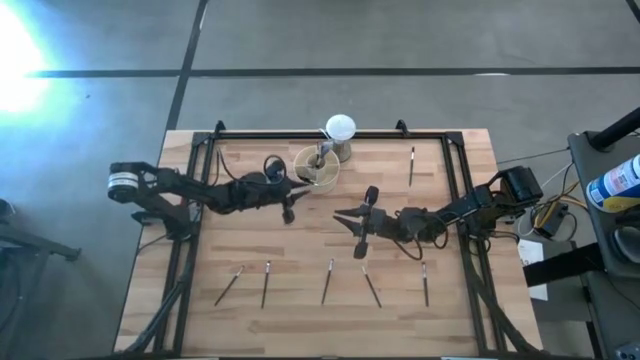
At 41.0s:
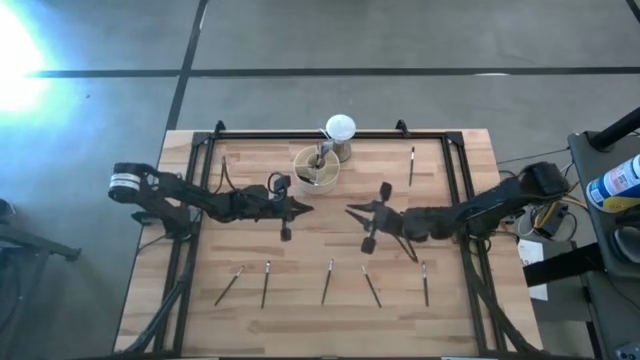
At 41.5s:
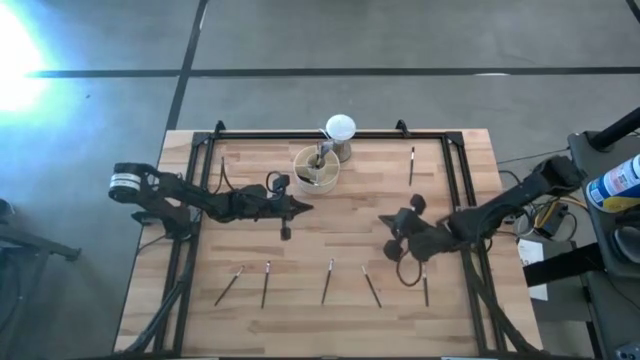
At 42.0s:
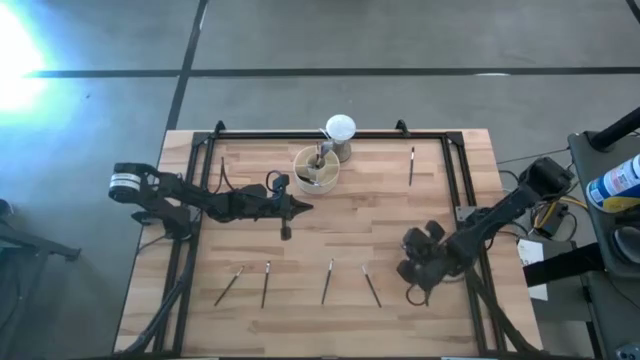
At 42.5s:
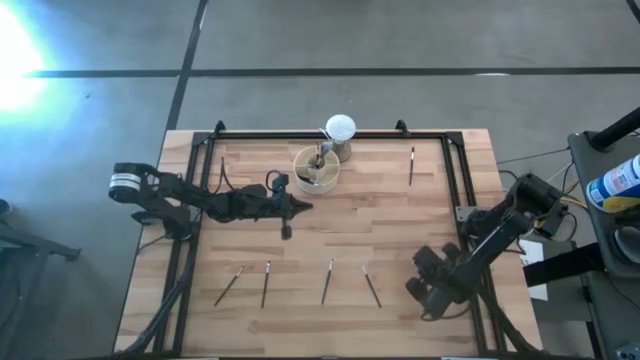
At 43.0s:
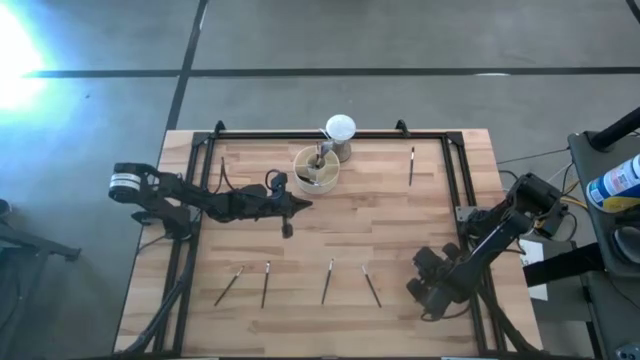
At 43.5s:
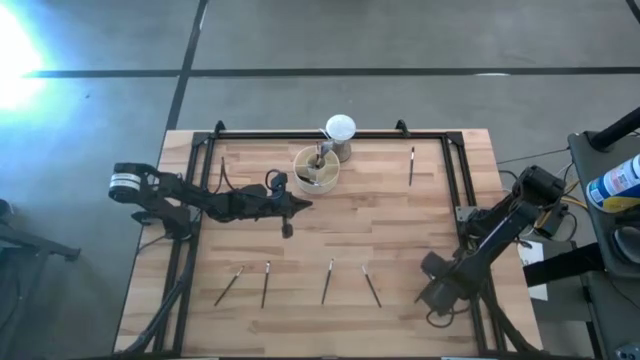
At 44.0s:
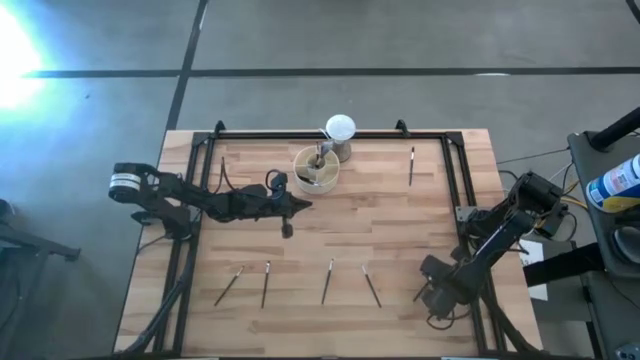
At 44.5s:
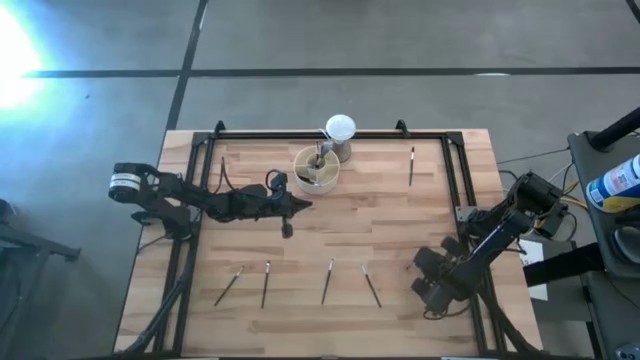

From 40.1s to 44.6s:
Task: Put items in baskets/containers
Put the black blush brush into the white organizer

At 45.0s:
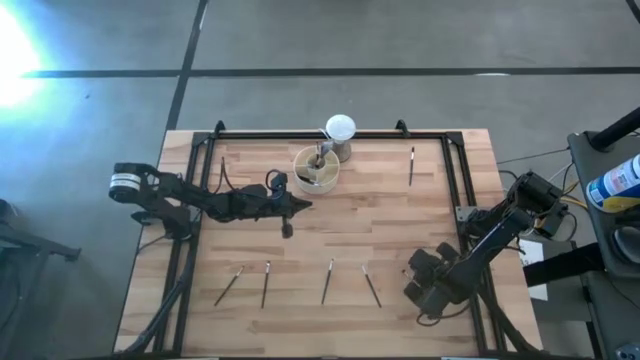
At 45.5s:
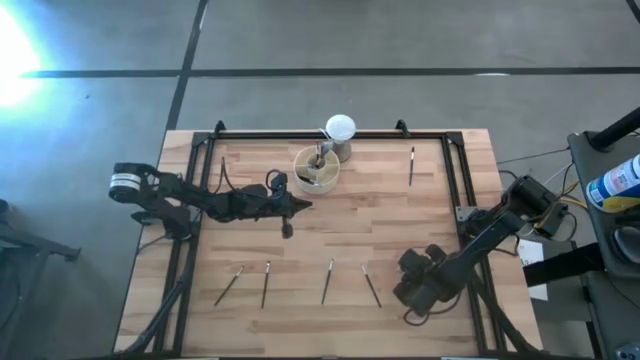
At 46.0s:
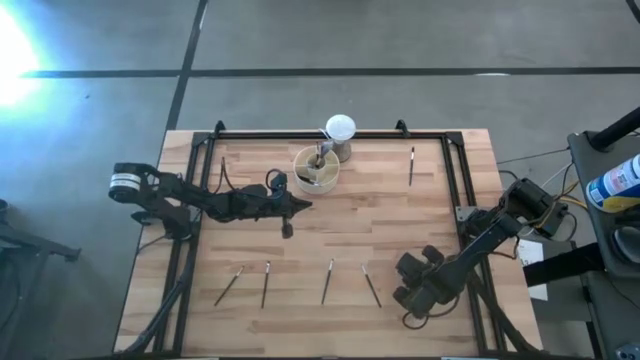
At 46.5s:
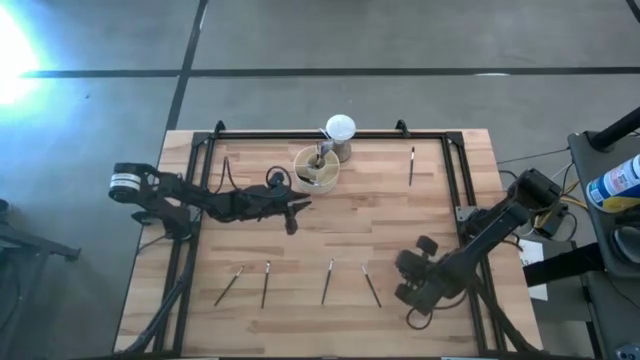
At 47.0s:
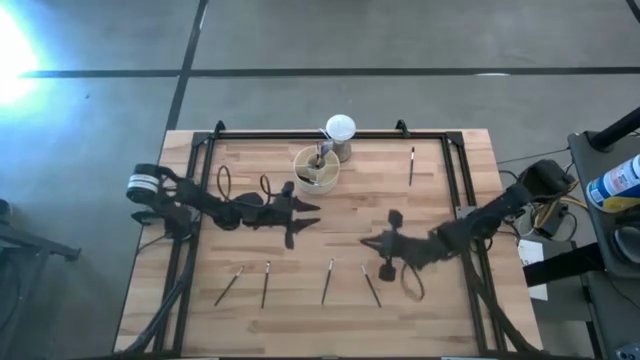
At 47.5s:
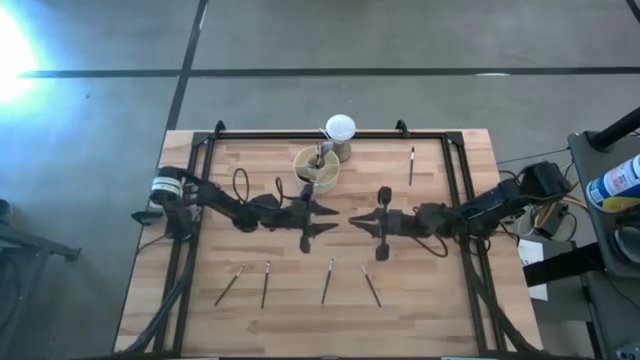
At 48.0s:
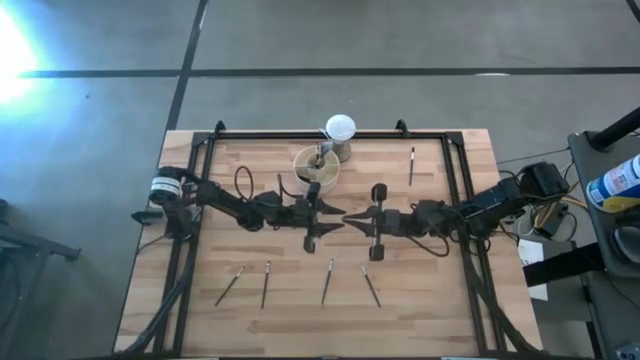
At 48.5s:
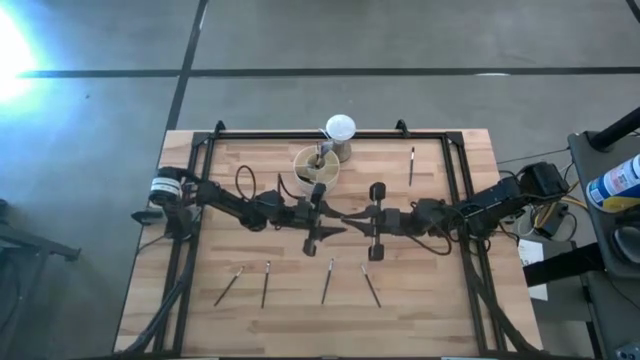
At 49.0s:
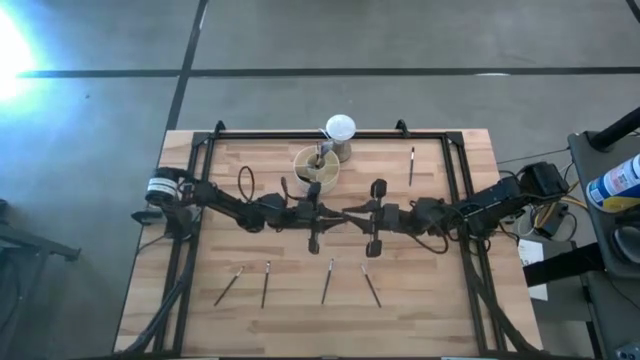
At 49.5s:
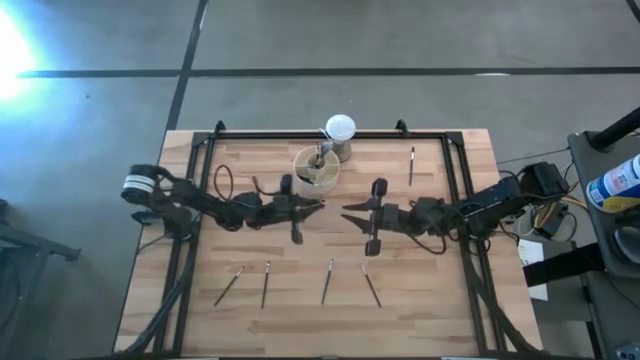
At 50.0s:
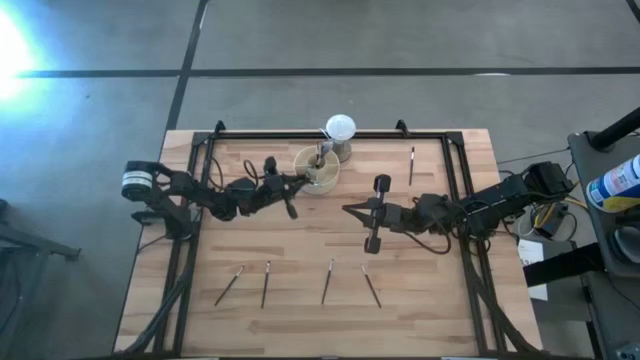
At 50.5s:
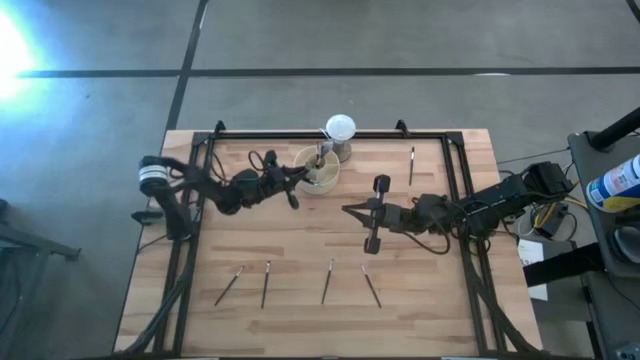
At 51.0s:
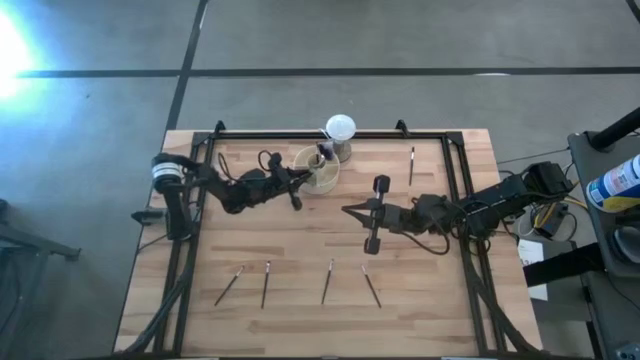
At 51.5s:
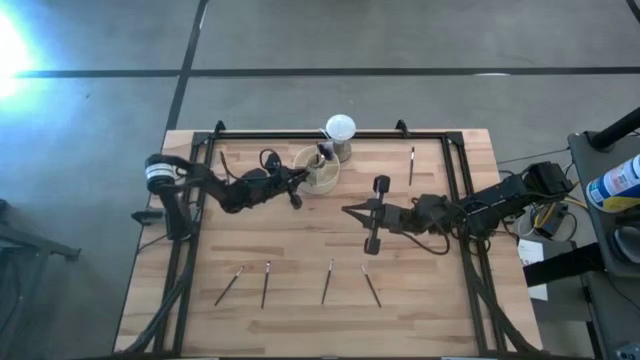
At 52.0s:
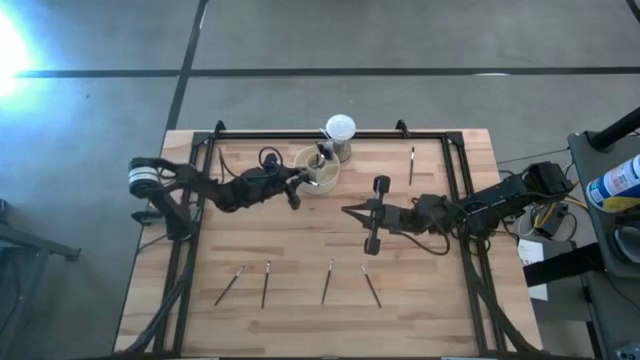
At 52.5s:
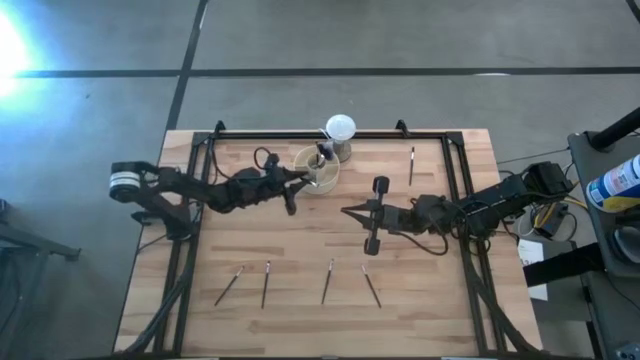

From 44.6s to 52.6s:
Put the black blush brush into the white organizer

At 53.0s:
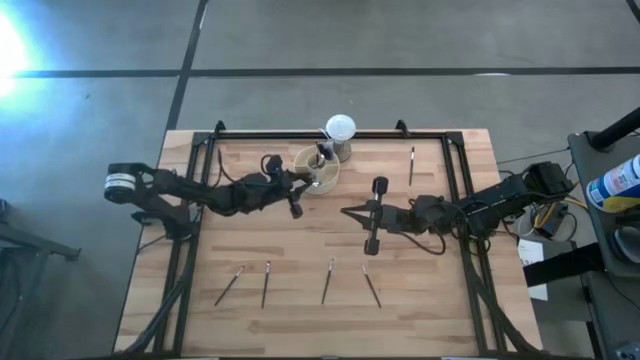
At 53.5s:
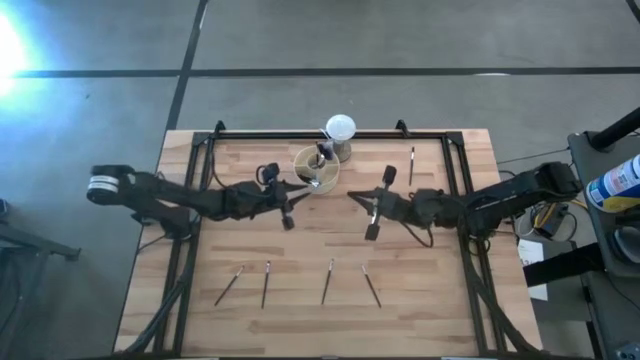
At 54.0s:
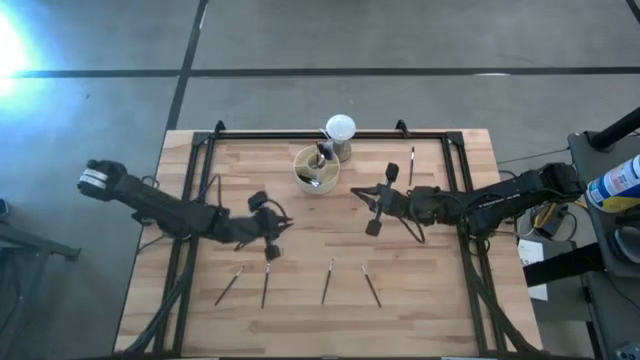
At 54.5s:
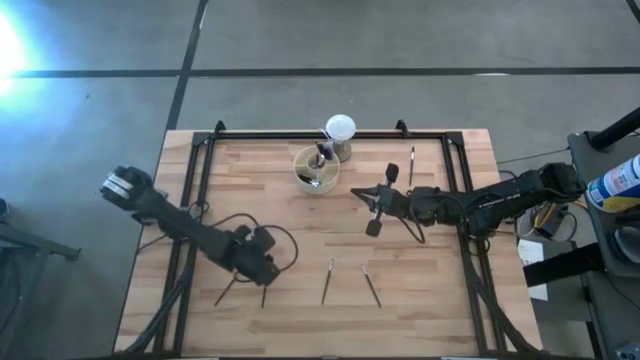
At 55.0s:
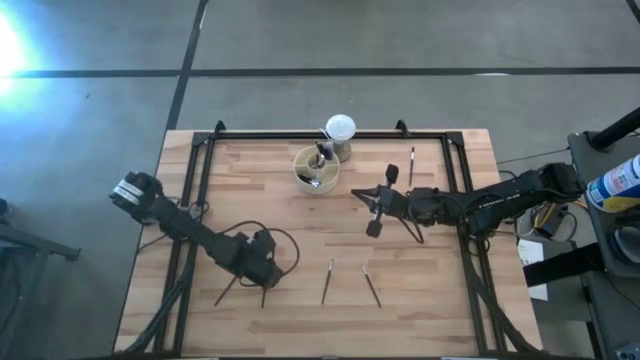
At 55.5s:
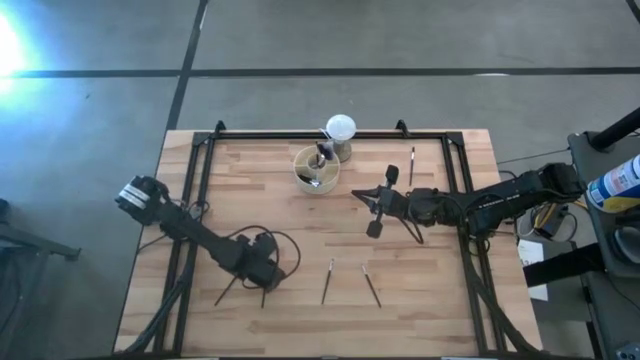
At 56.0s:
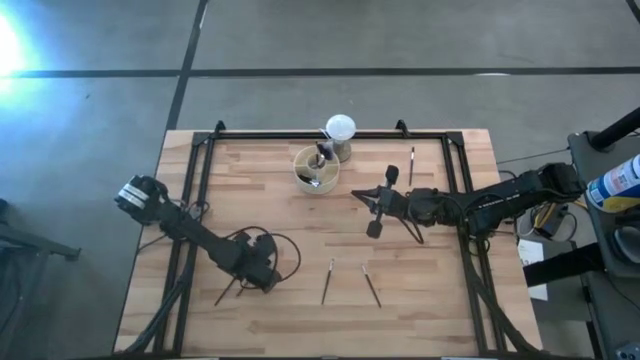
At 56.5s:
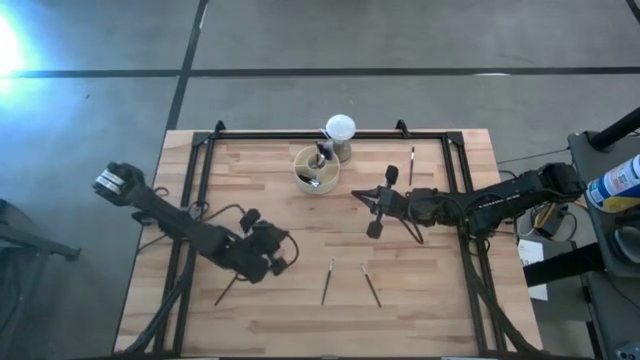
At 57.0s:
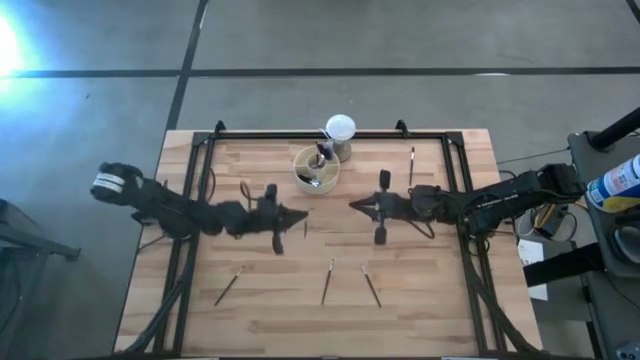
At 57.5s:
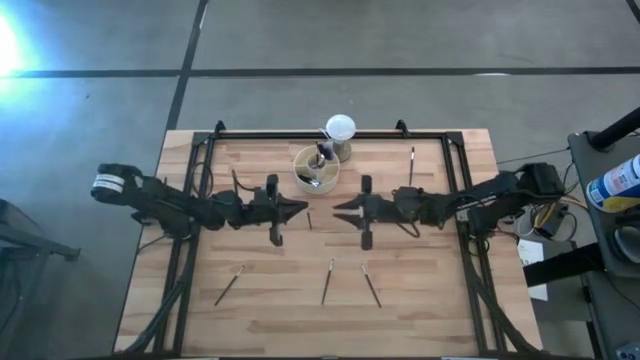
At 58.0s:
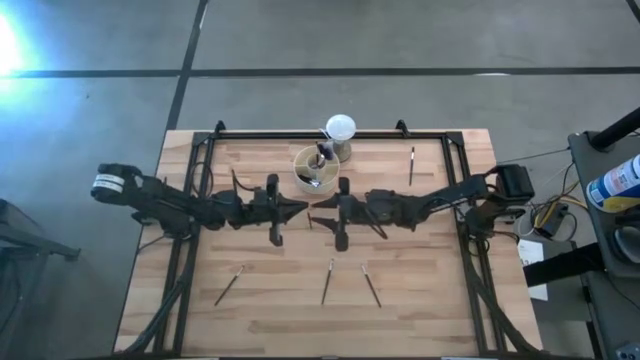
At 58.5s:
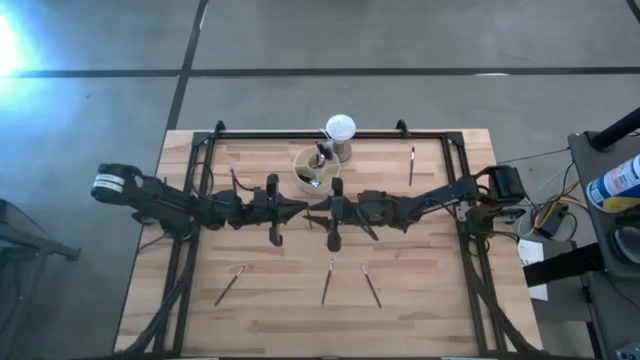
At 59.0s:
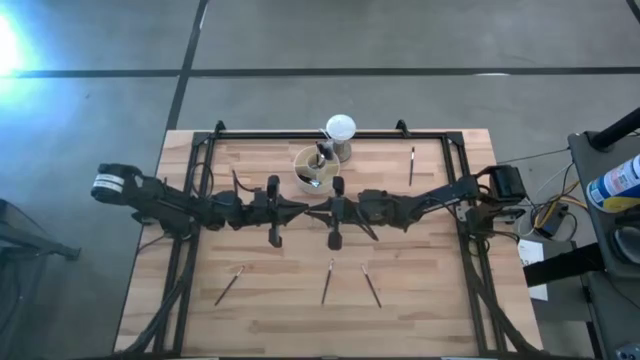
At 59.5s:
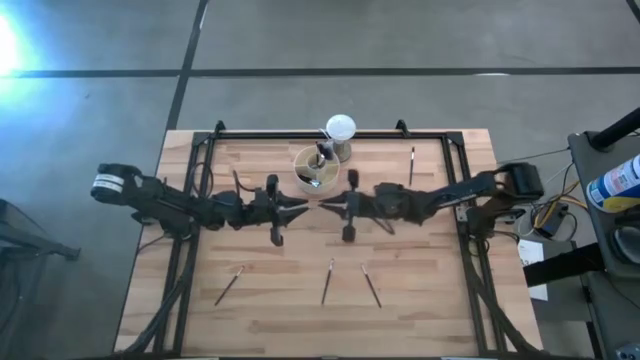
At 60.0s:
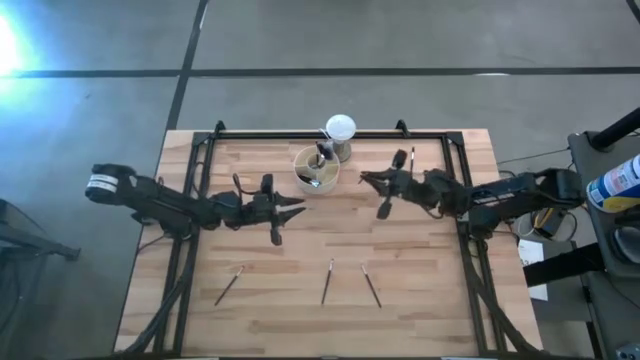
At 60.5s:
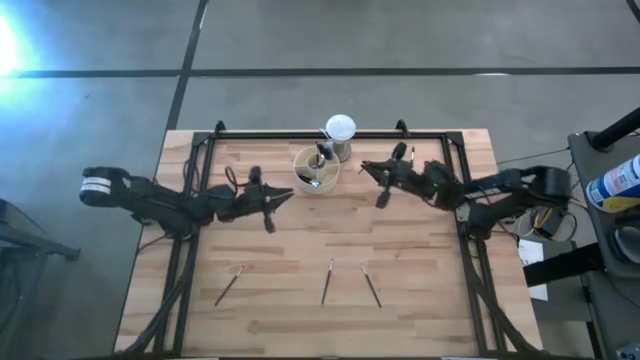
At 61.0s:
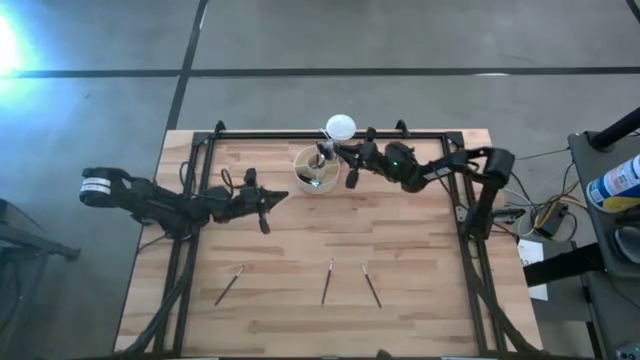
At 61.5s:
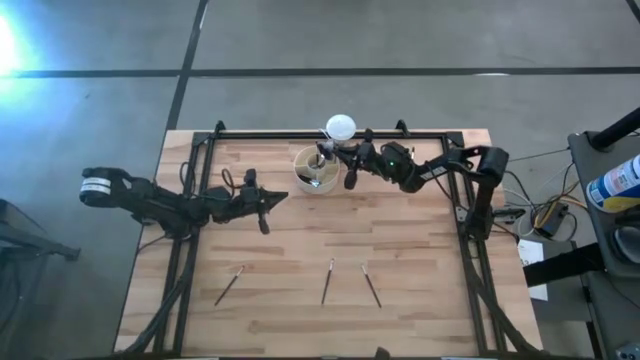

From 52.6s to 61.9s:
Put the black eyeshadow brush into the white organizer

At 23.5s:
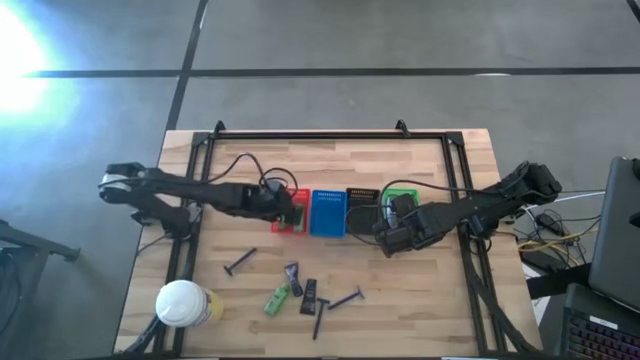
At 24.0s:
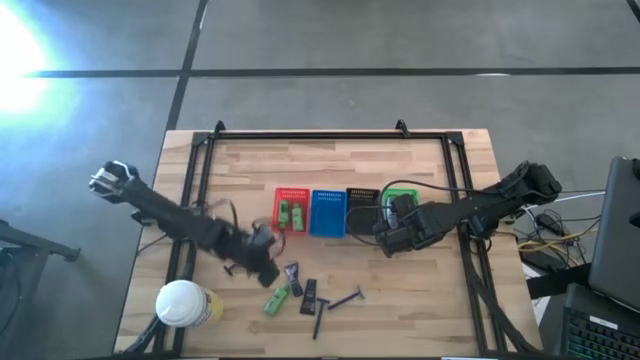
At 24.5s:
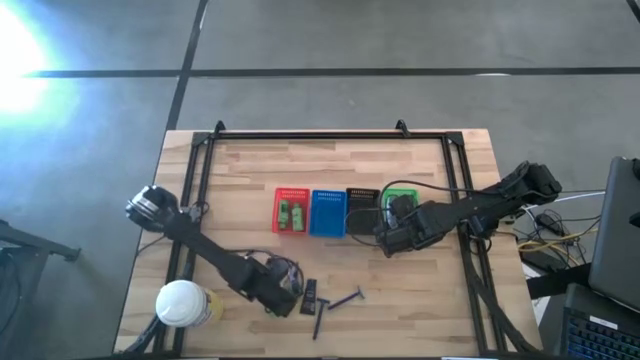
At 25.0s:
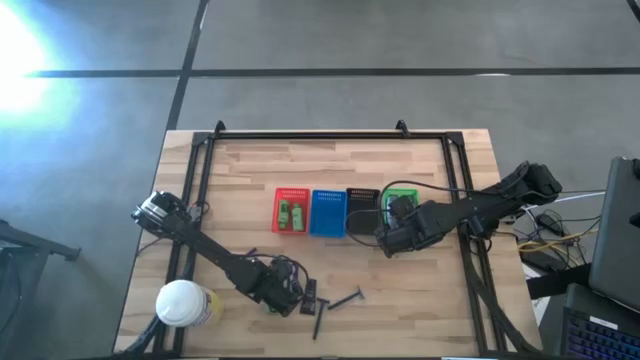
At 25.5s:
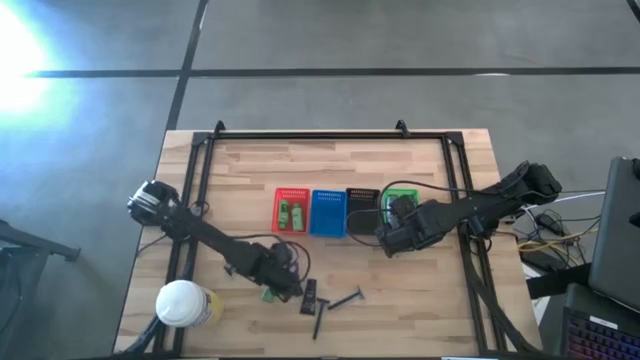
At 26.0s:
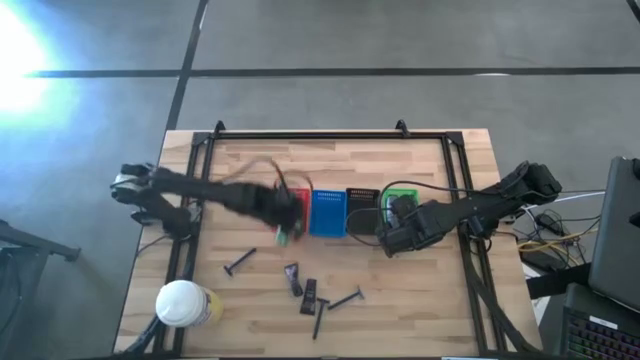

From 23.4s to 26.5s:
Task: Pick & Place Travel size toiletries
Put the green shampoo into the red bin
